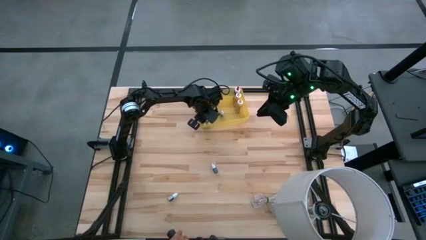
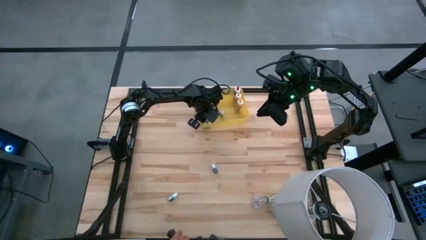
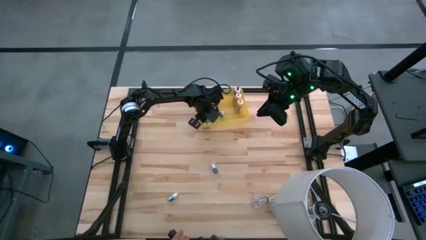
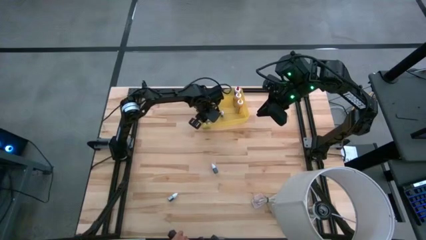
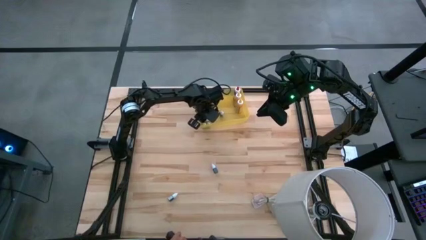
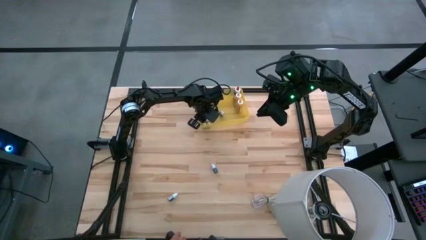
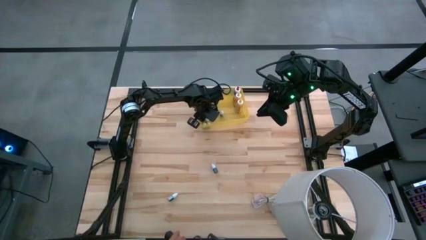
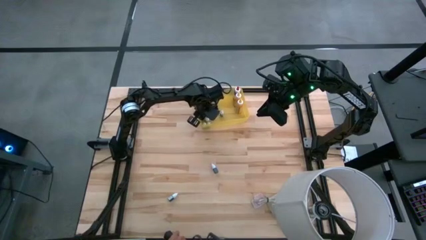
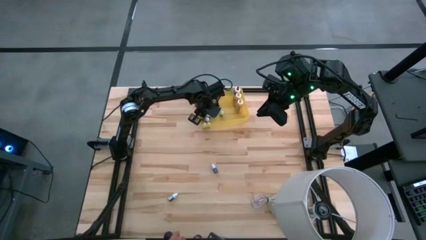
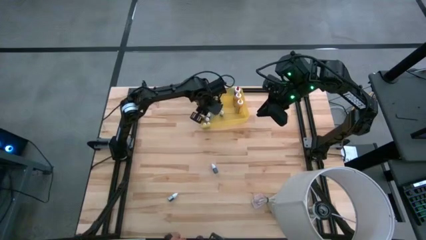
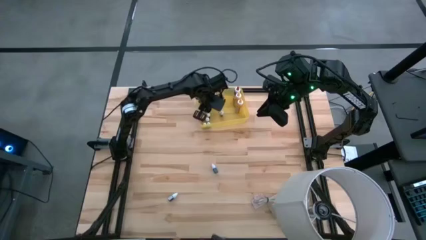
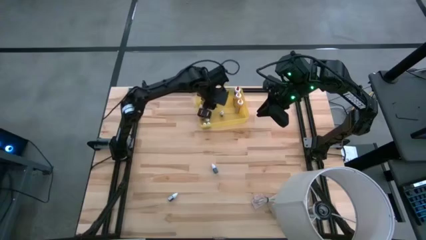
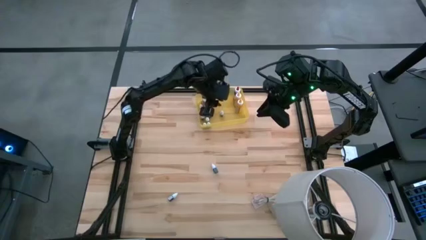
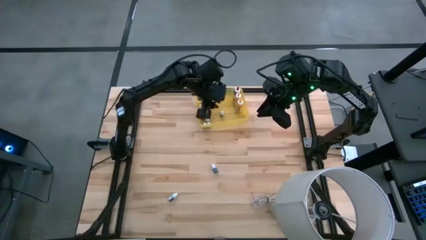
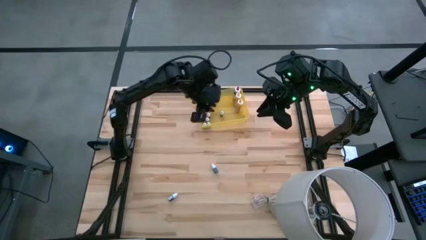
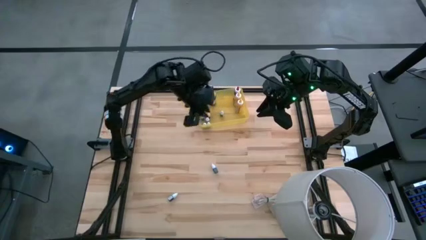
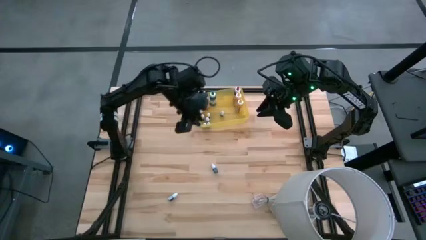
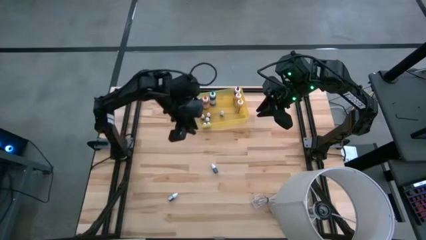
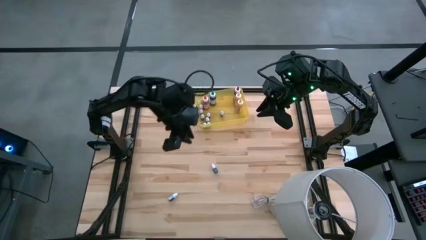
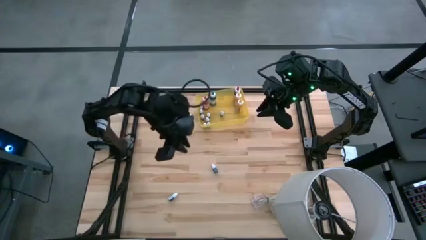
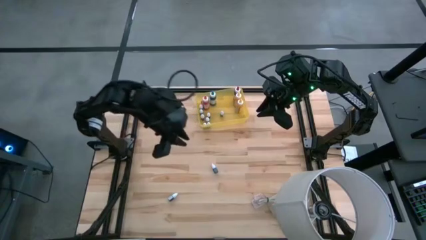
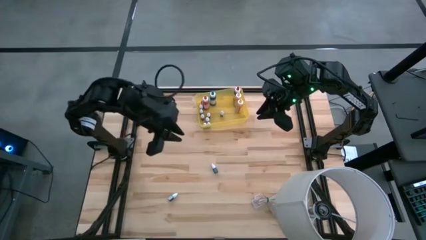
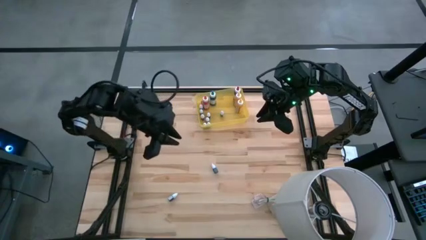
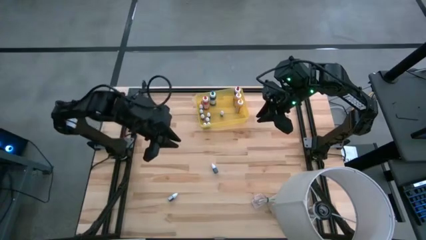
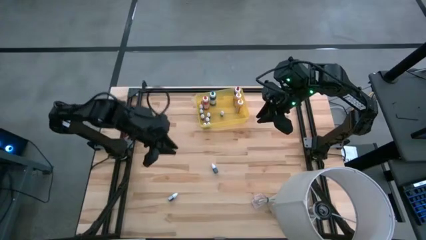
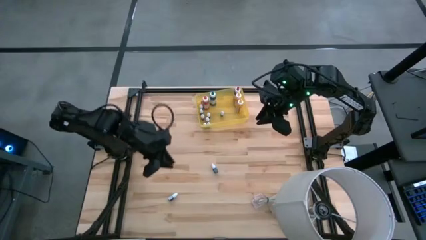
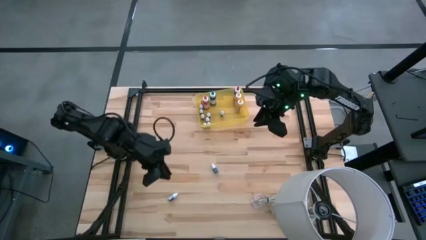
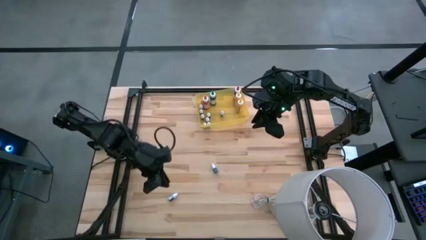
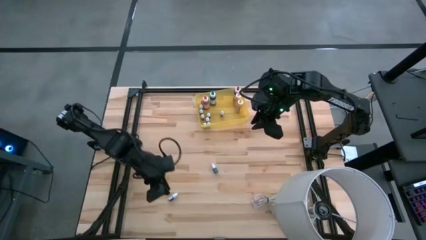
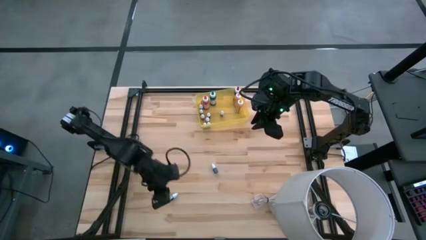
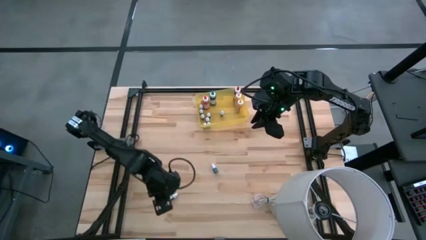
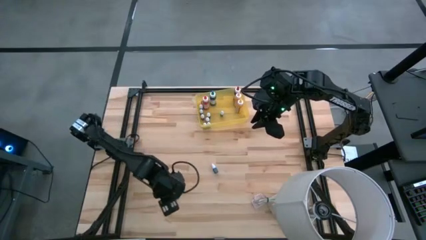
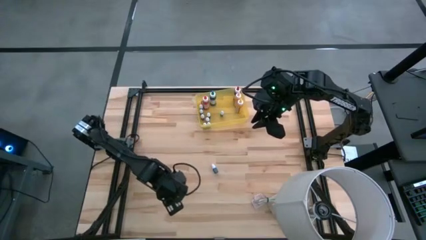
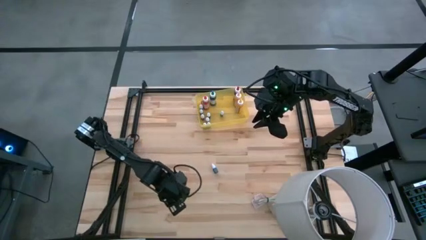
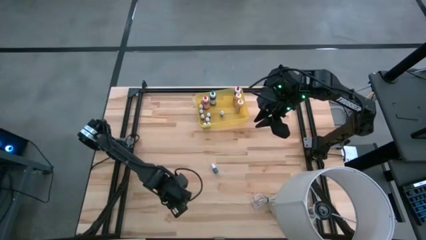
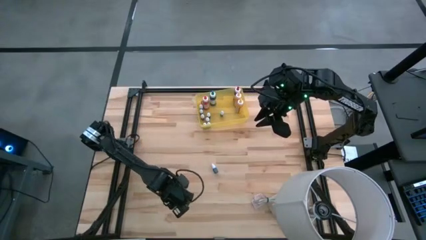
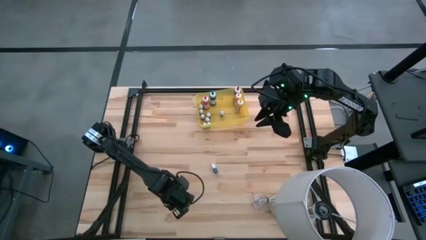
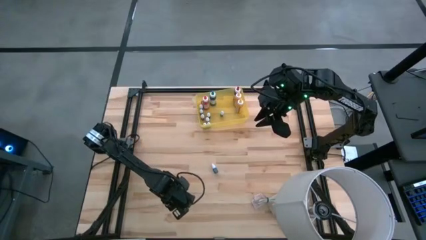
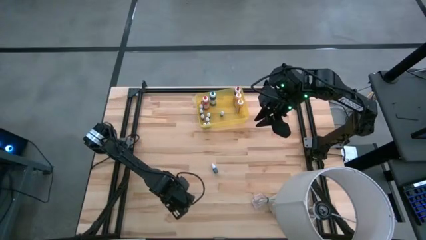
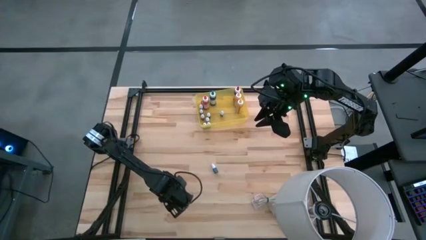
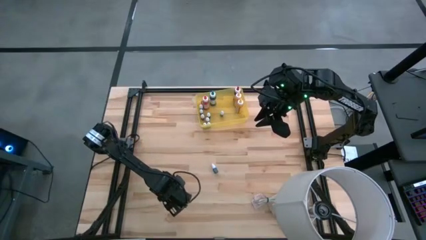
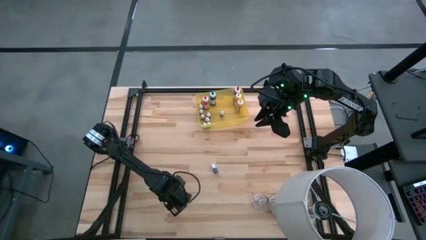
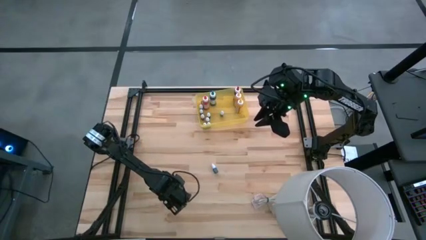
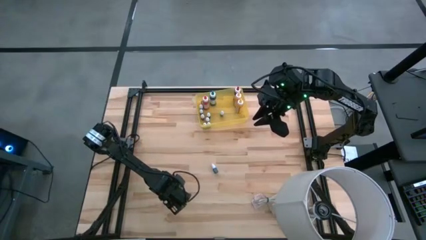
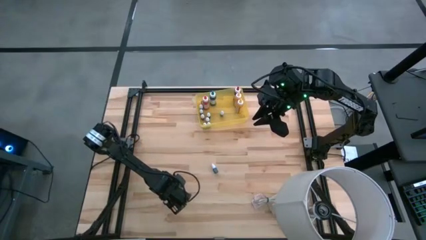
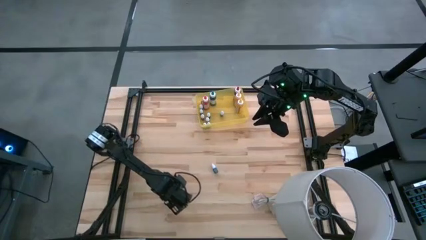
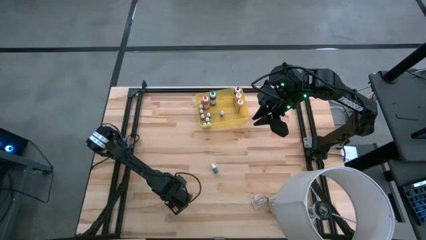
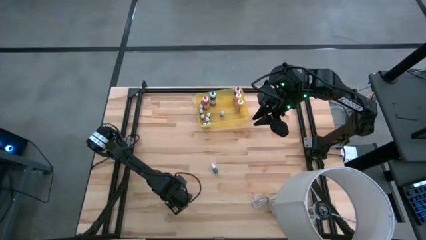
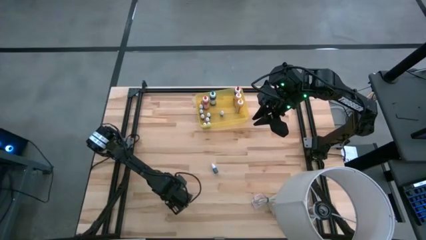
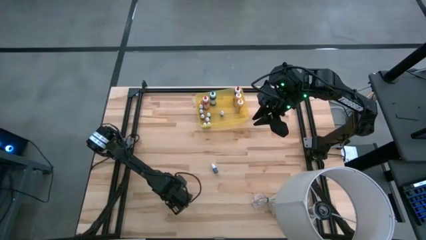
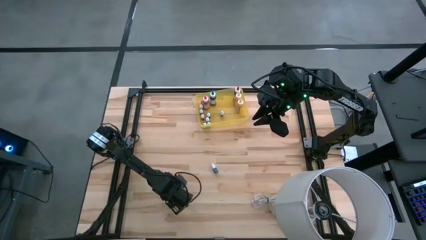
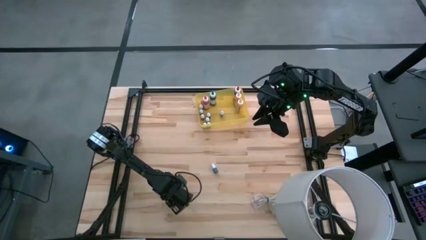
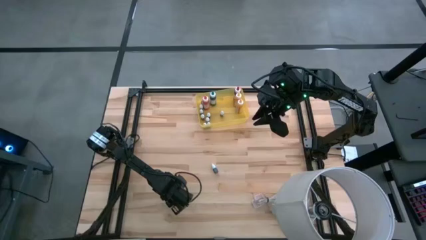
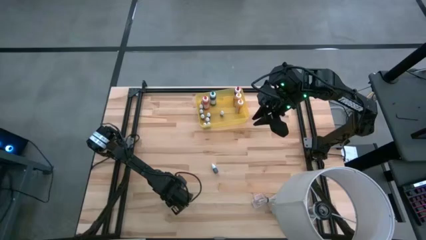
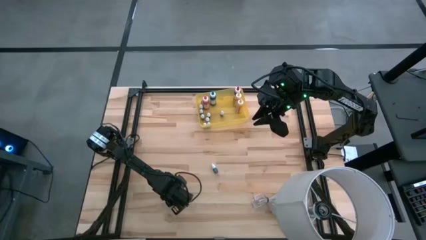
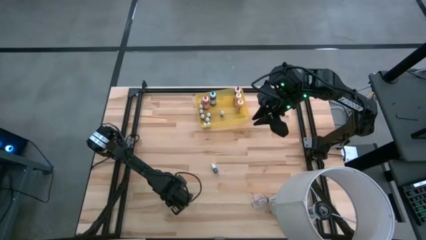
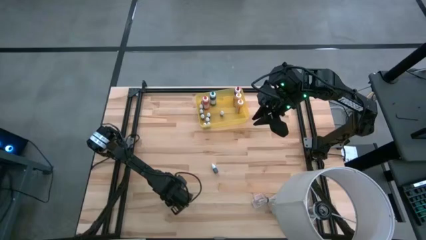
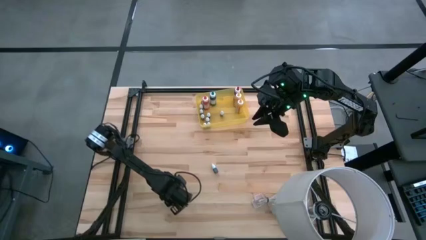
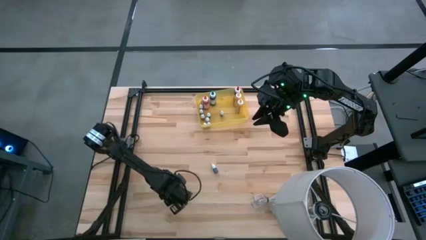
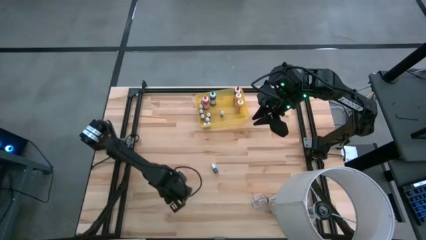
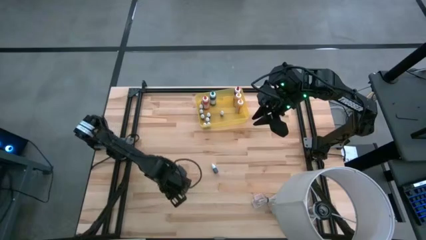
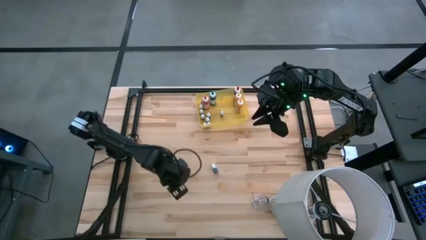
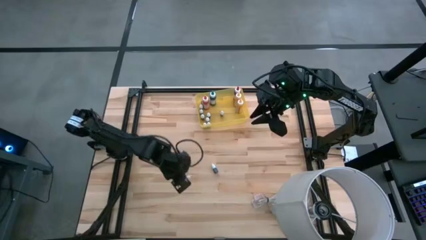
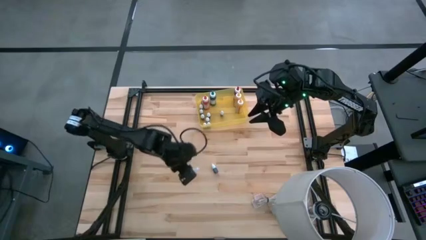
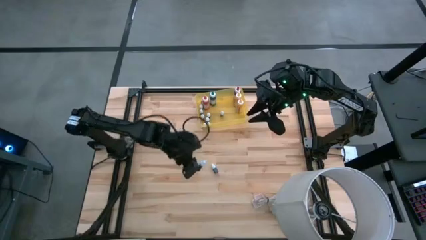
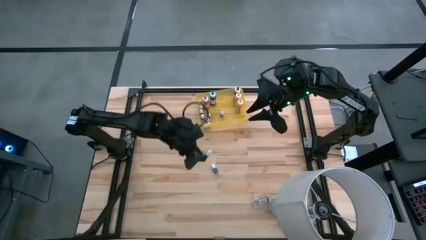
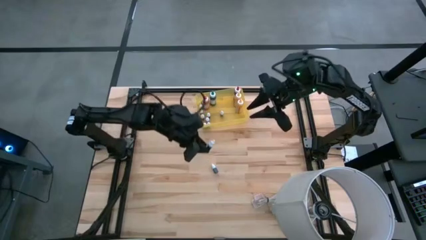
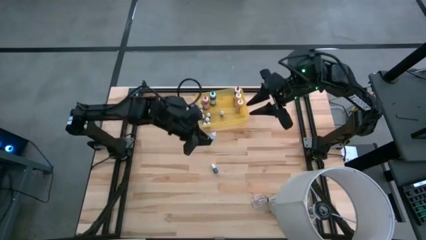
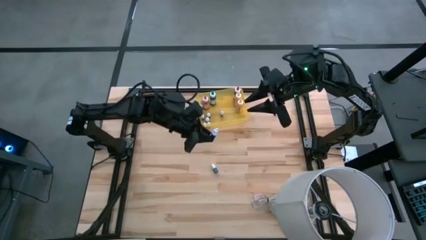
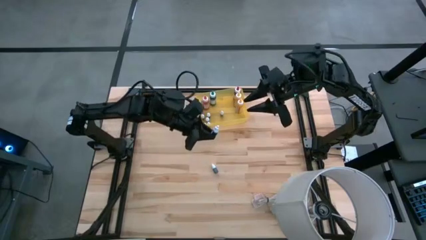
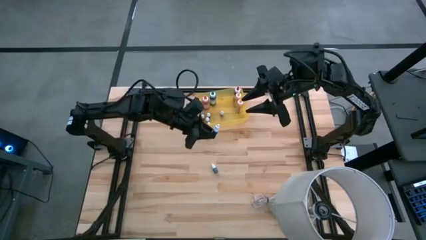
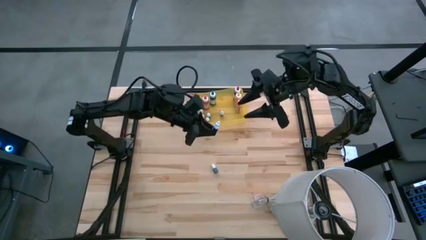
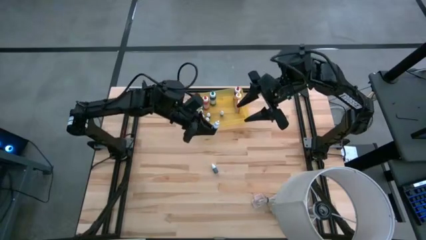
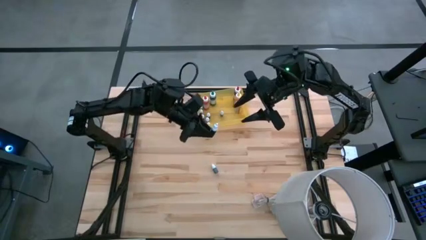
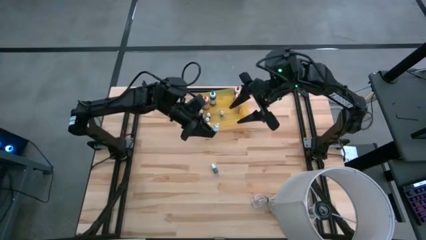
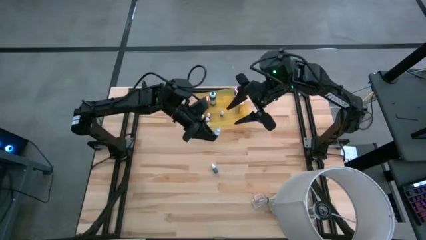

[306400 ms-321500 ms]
Task: Pick & Place food coloring
Put the small black food coloring bottle into the yellow bin
